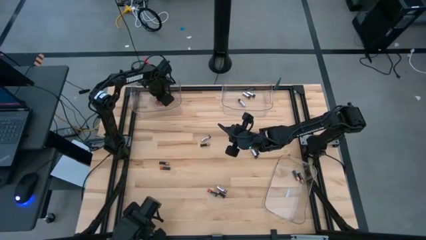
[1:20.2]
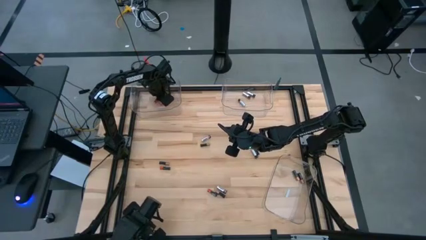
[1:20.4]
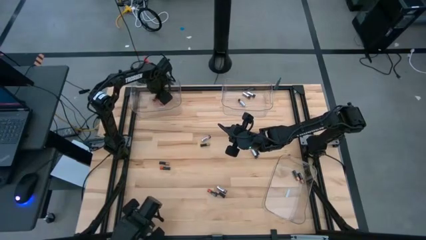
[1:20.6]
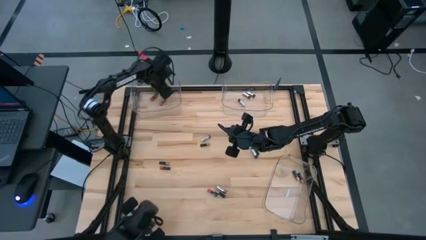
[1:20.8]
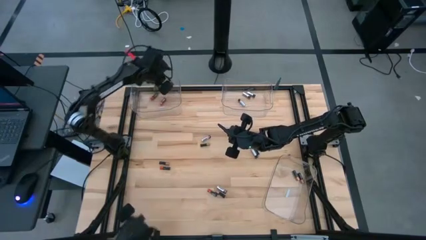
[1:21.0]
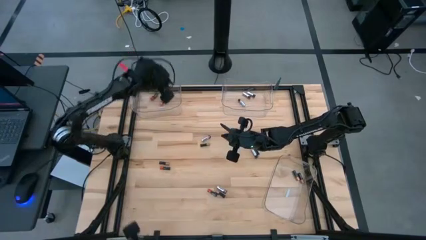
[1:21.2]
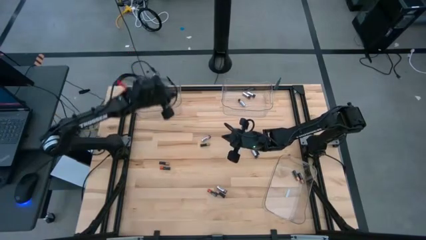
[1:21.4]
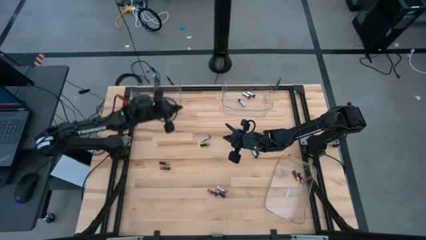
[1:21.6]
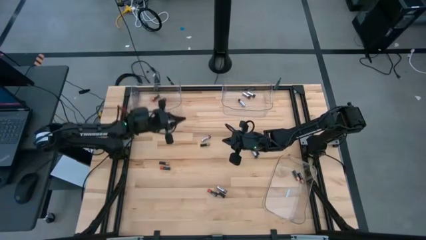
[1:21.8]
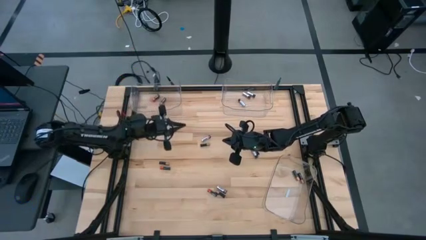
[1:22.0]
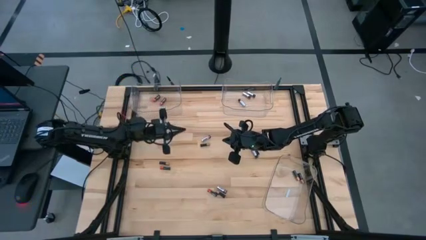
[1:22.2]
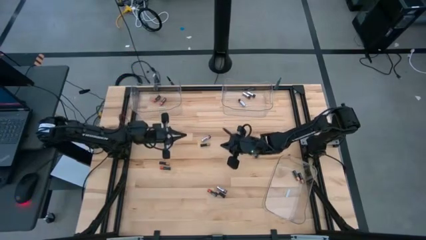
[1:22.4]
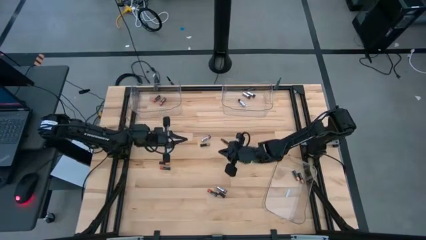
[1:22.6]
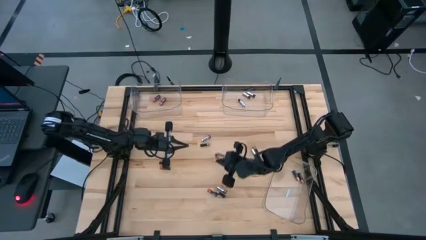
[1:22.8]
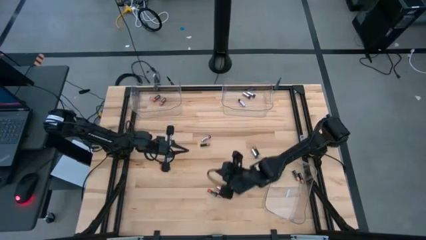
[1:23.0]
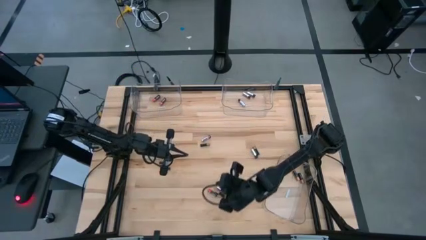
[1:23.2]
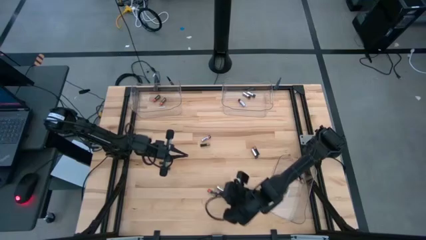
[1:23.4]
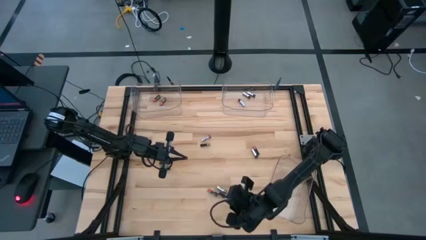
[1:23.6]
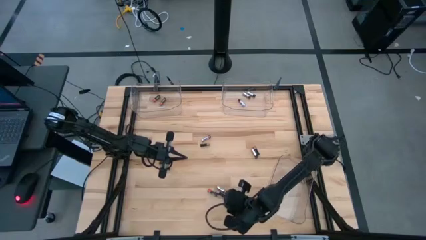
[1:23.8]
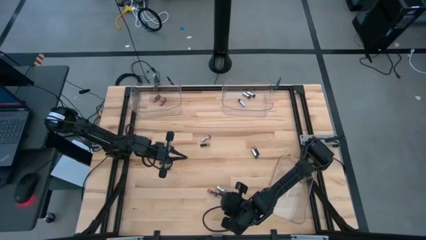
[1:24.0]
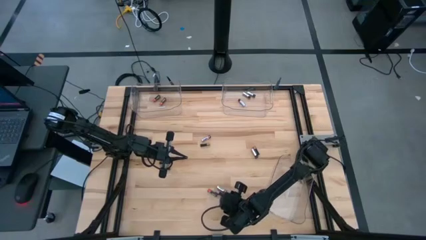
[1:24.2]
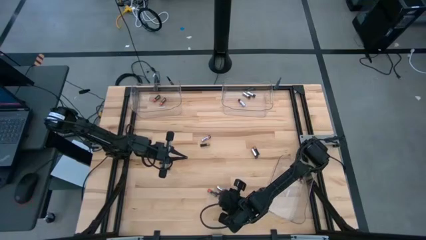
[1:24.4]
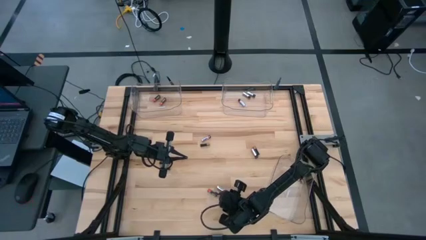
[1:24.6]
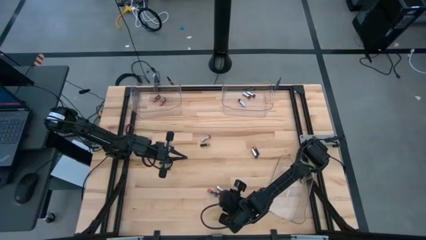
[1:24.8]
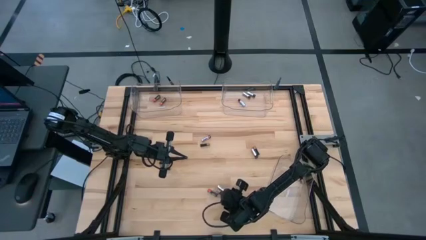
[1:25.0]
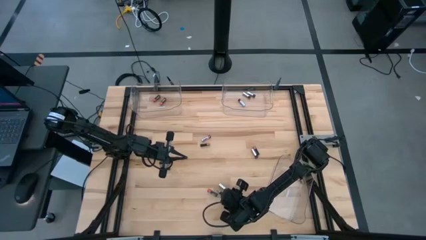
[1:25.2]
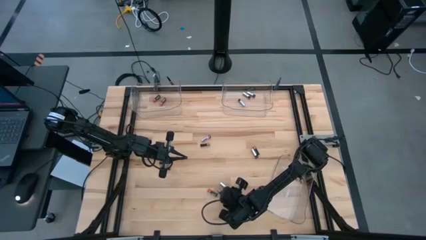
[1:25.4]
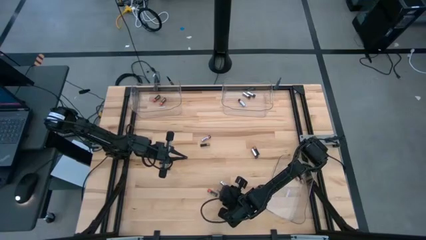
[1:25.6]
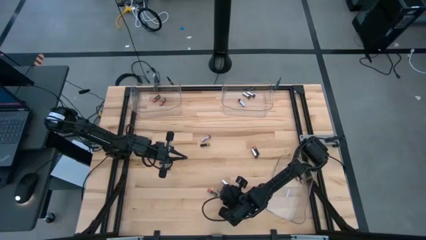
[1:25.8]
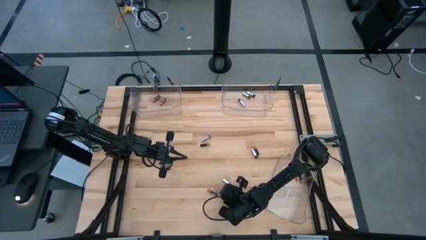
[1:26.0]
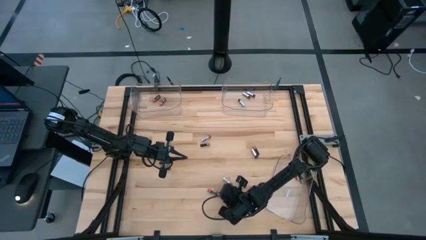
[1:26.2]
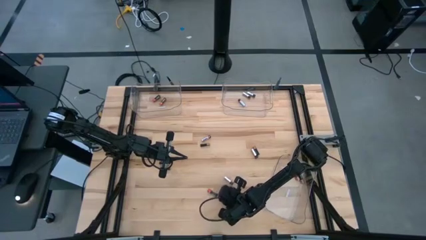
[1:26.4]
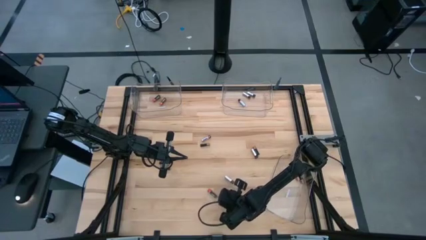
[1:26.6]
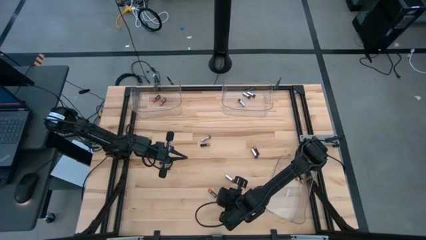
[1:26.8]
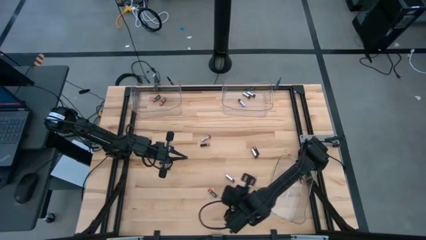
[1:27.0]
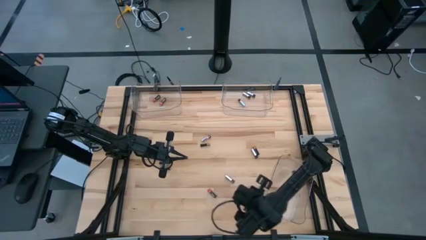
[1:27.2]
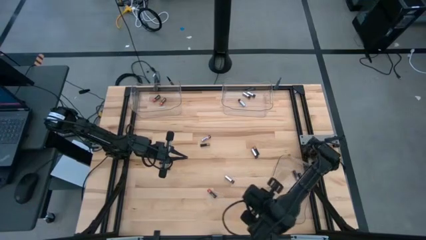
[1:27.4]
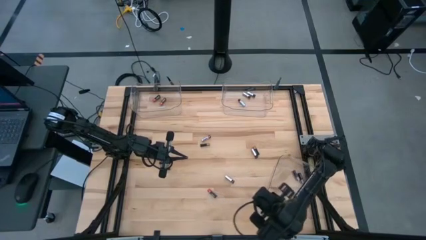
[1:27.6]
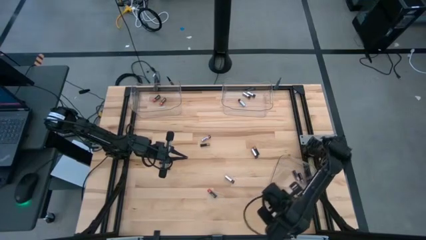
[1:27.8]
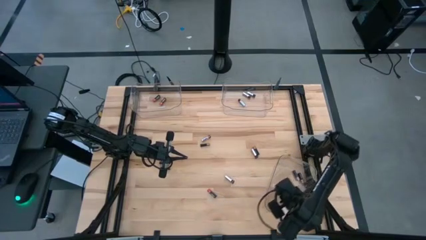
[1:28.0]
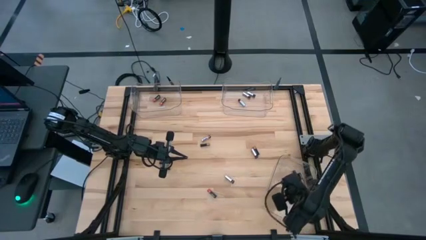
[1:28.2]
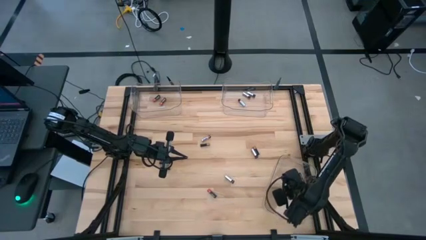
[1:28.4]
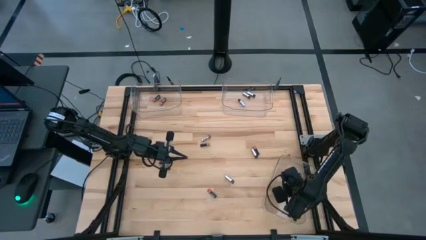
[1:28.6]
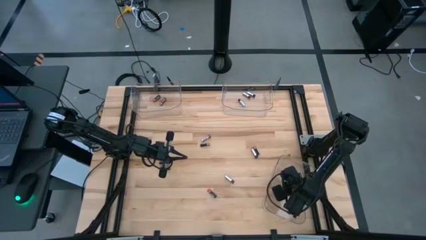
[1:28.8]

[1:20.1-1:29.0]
Task: Sort batteries
Put the brown battery into the bottom right transparent bin

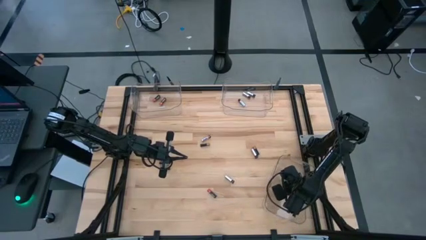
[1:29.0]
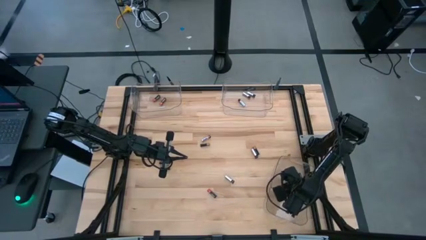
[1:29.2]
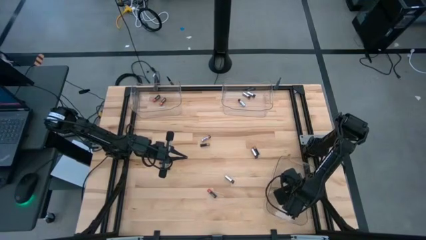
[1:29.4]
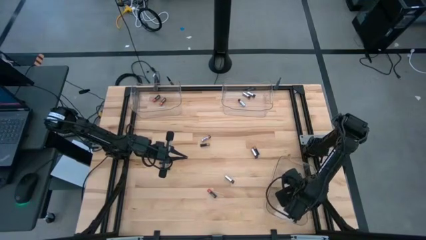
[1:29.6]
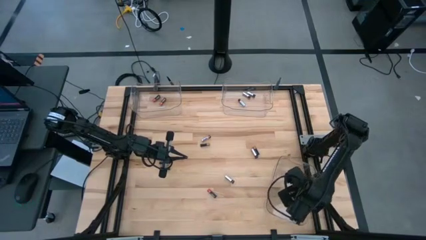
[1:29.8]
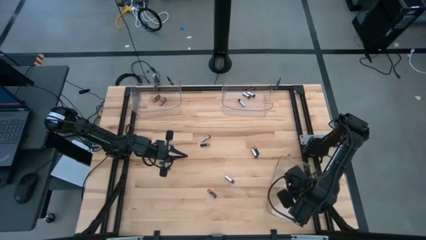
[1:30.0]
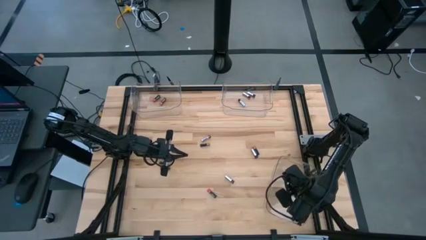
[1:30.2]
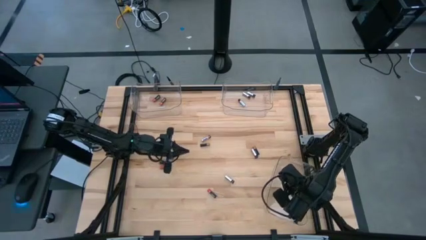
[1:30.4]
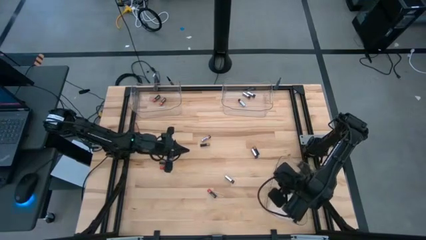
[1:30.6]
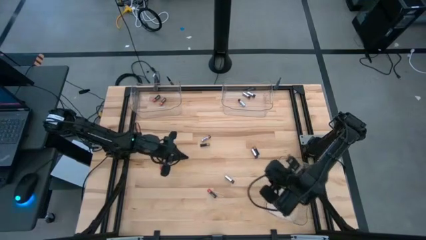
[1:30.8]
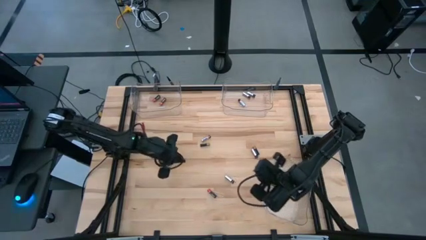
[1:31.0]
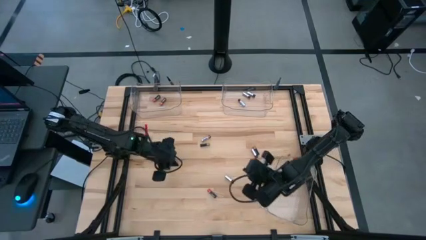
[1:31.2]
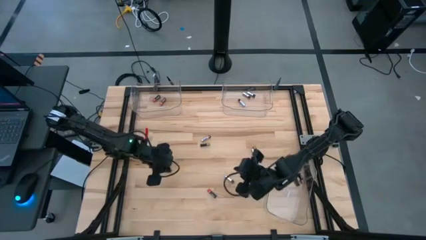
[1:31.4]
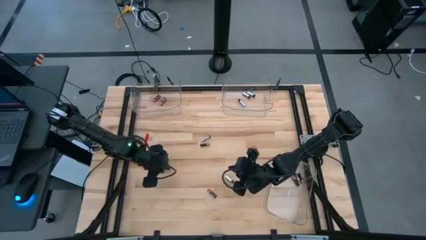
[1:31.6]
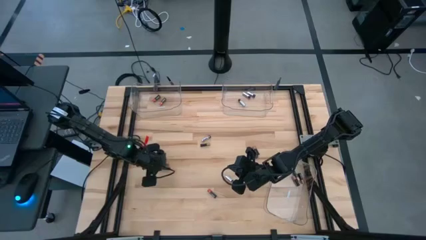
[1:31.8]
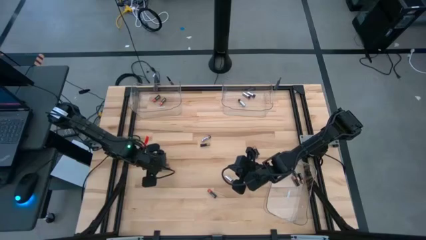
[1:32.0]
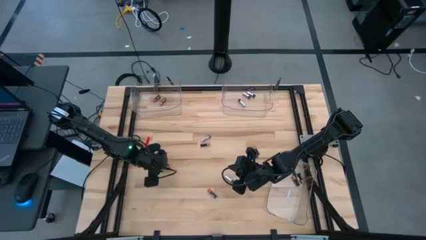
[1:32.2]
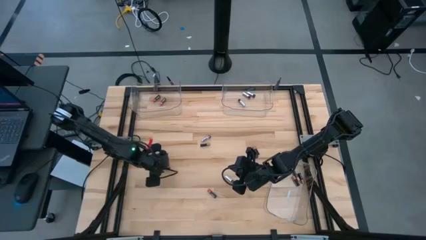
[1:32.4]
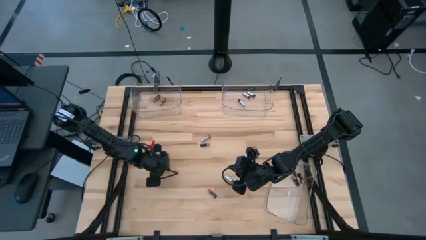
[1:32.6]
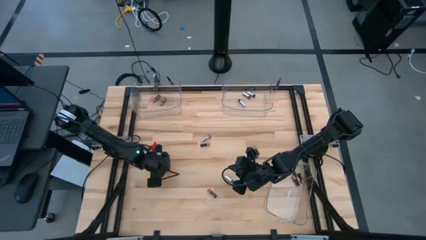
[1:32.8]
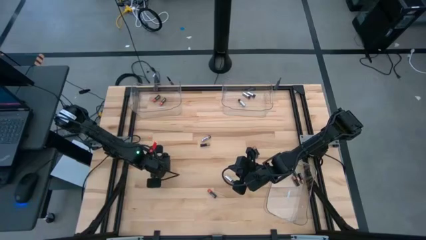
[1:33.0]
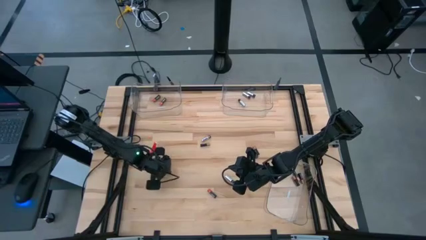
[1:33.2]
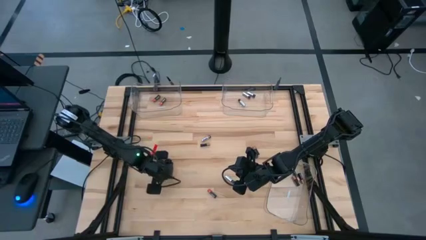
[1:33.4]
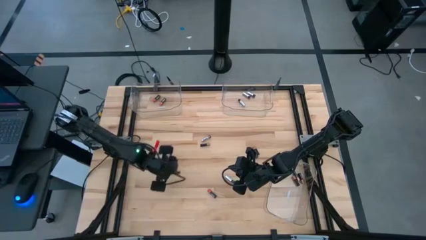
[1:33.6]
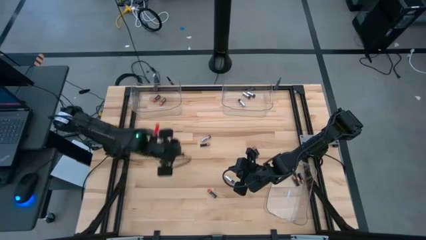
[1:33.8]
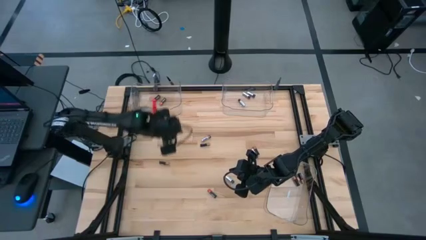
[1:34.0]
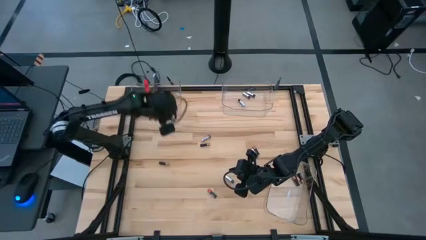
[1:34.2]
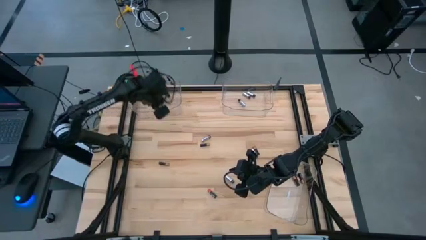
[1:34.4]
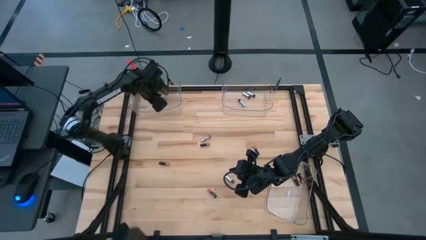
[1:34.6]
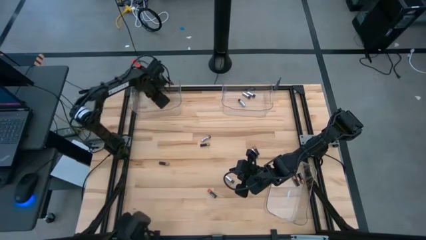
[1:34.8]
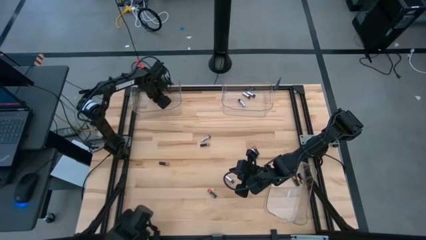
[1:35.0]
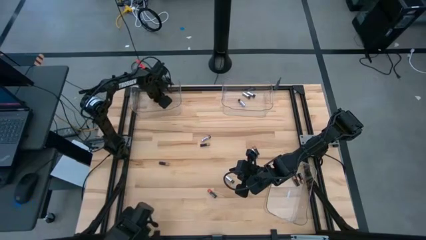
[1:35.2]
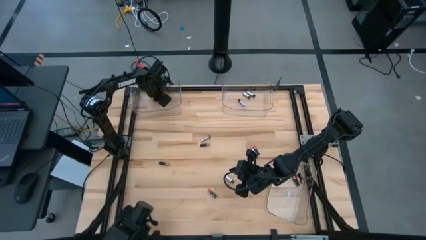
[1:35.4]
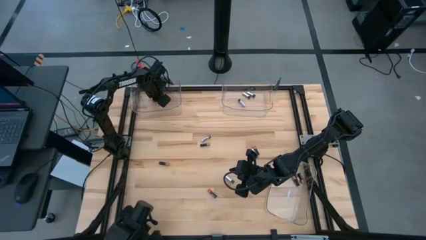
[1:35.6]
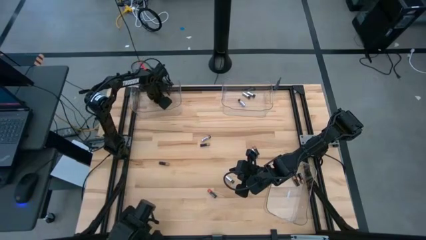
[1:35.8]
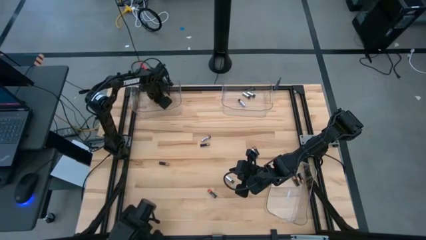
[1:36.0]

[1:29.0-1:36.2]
Put the red battery into the top left transparent bin
